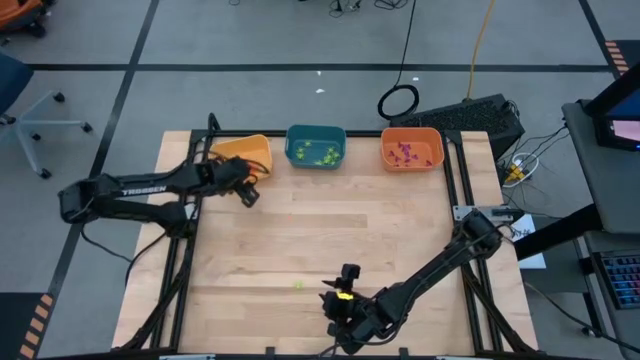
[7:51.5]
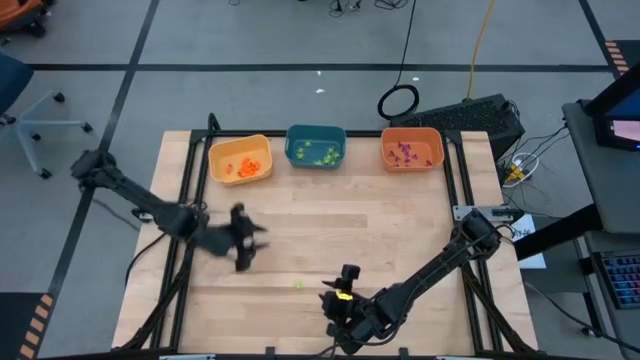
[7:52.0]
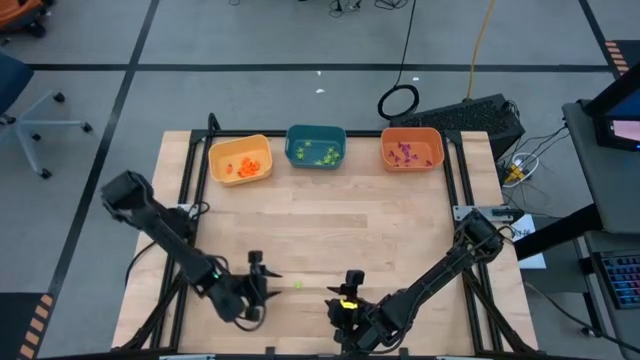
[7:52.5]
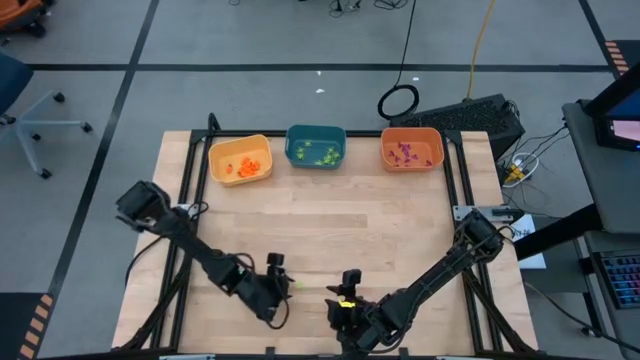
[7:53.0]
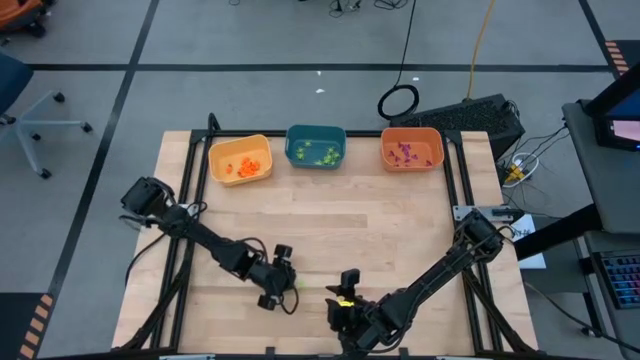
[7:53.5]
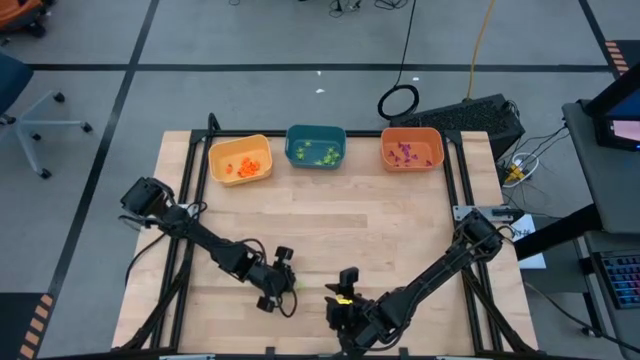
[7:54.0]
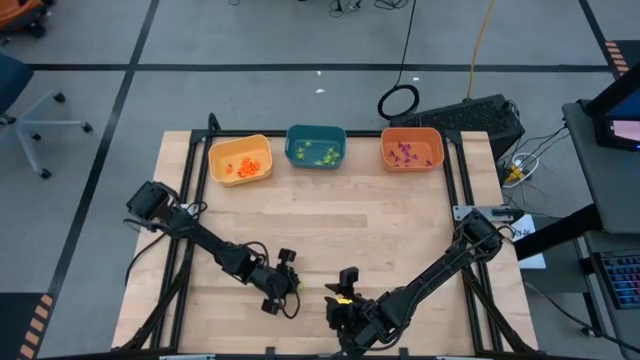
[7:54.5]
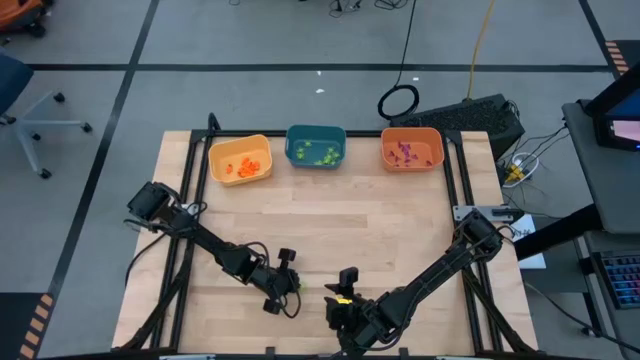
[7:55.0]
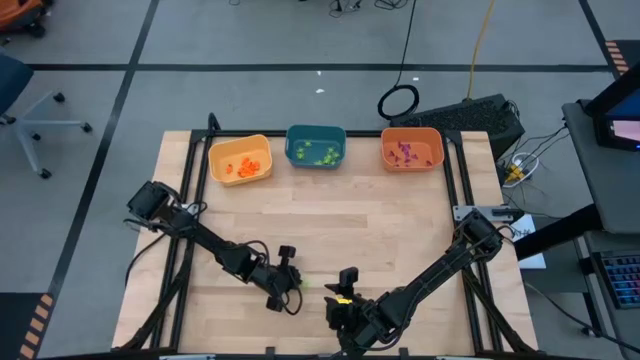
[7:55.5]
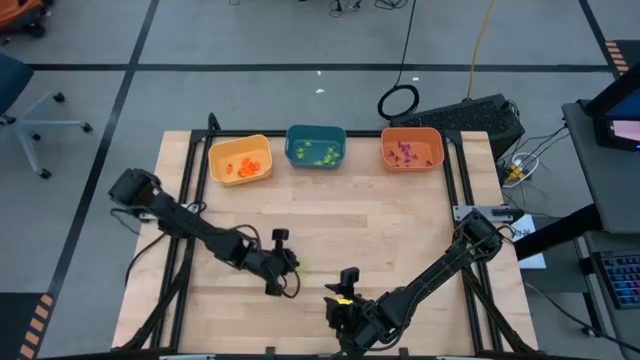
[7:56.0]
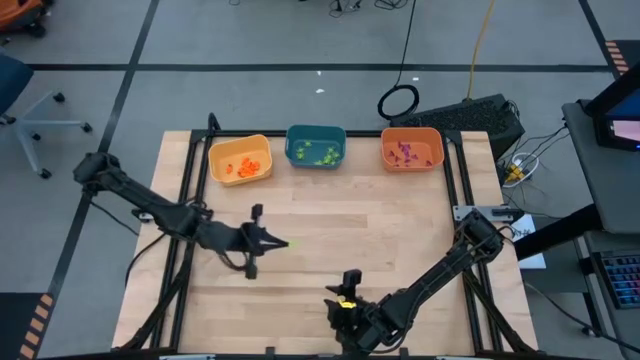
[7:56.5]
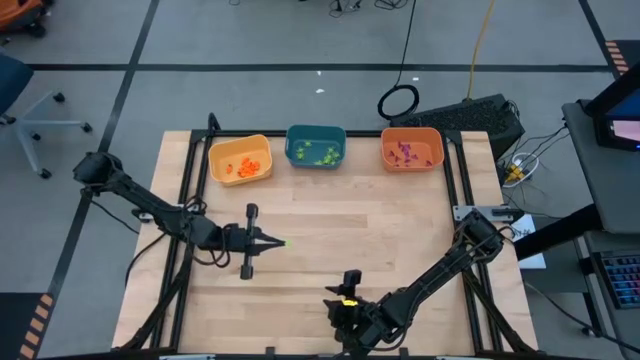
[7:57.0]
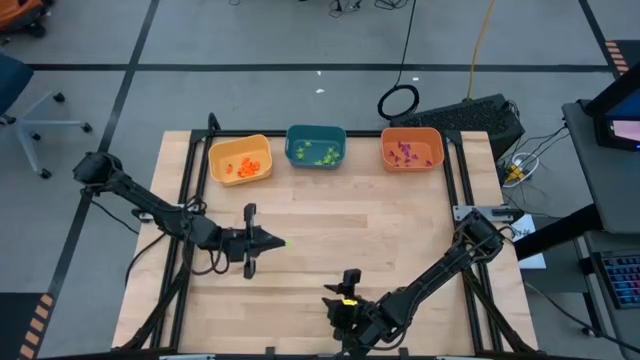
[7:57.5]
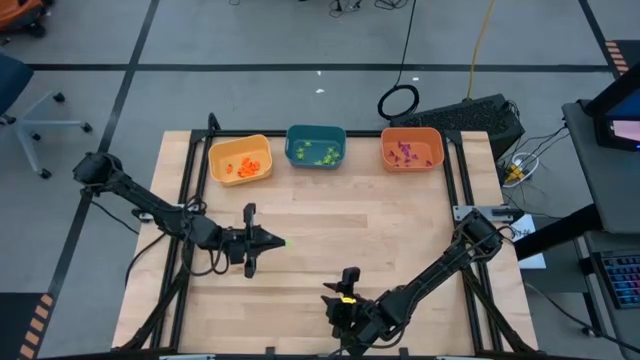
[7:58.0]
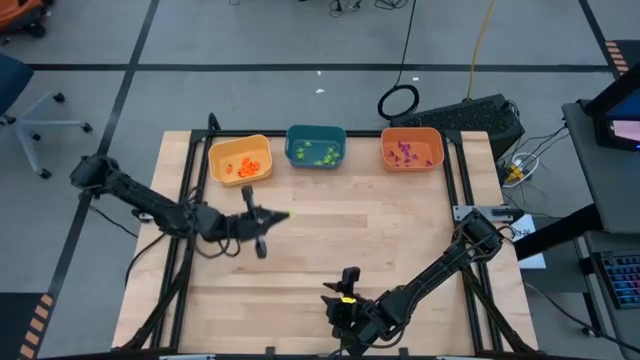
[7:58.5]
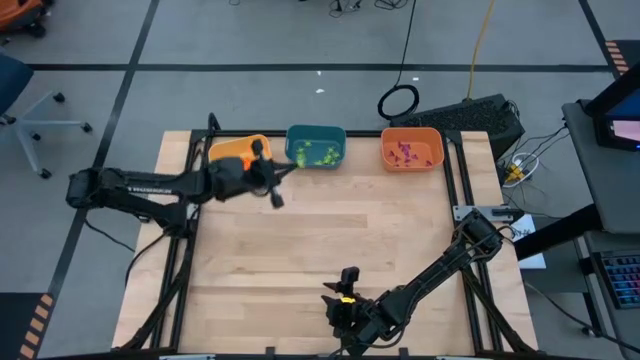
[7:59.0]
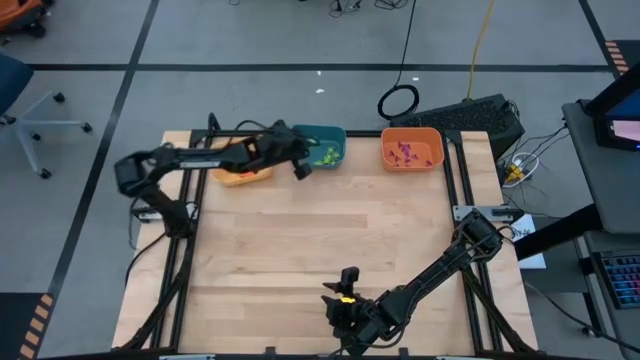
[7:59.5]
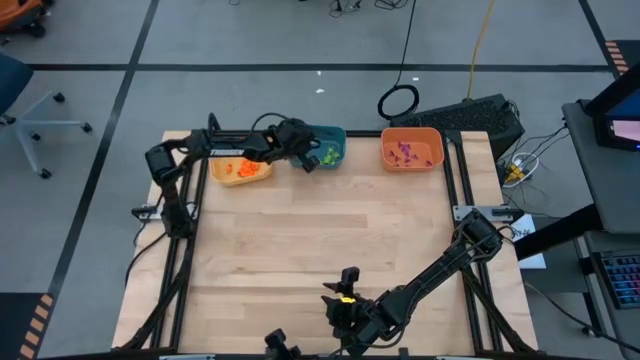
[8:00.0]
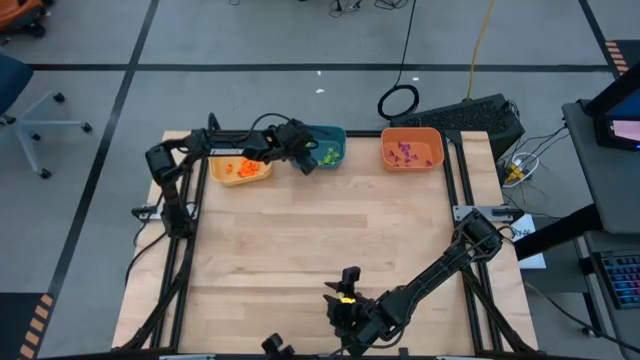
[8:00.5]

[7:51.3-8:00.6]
Task: Sort Halloween decoration
Put the green spider toy into the blue bin

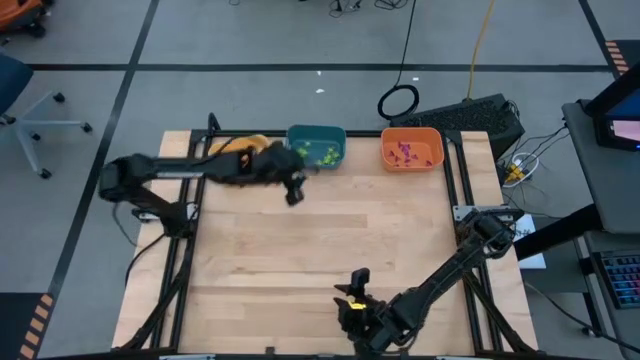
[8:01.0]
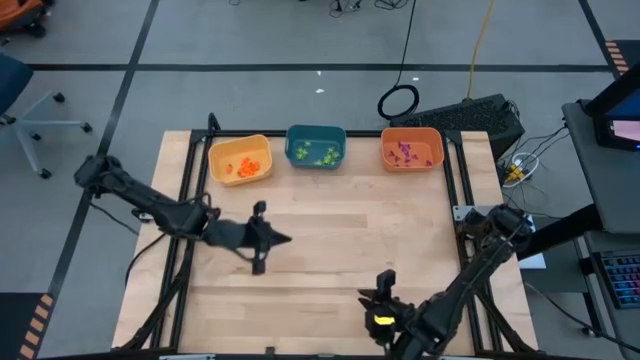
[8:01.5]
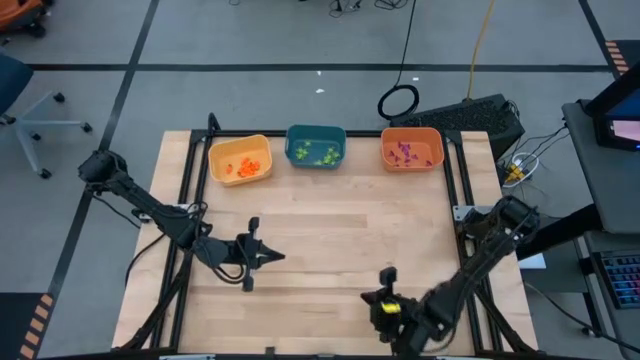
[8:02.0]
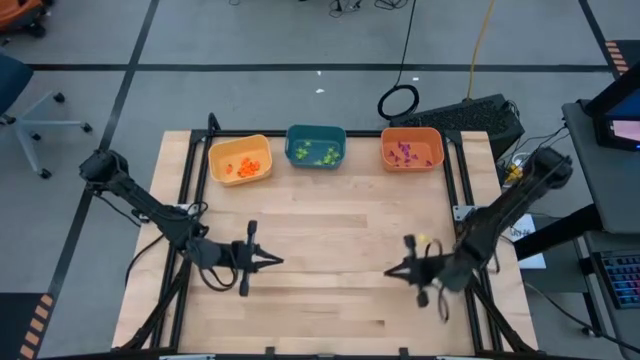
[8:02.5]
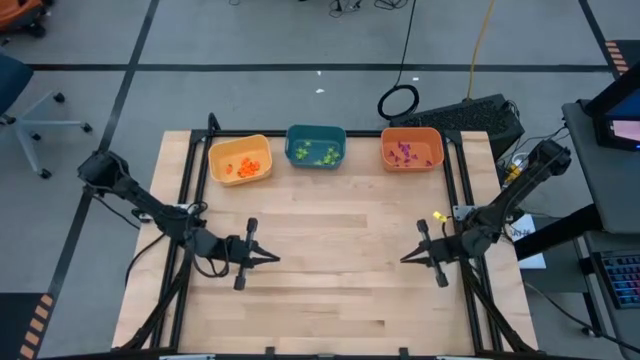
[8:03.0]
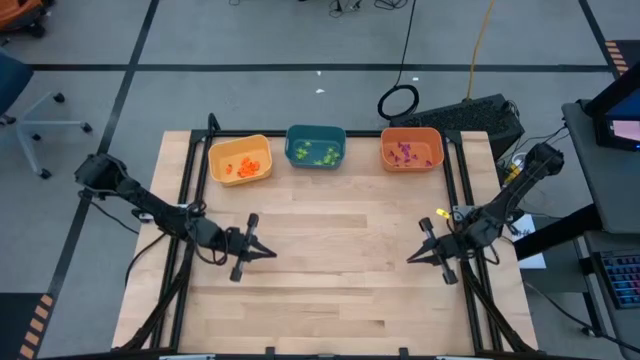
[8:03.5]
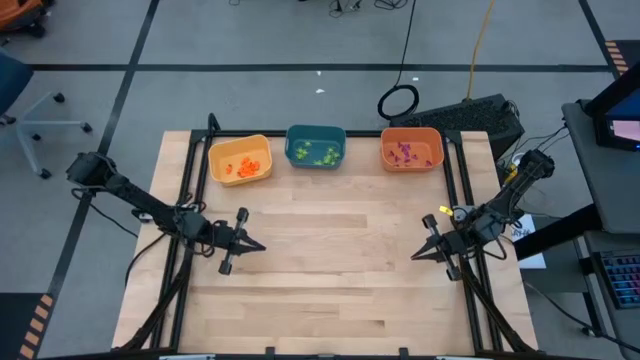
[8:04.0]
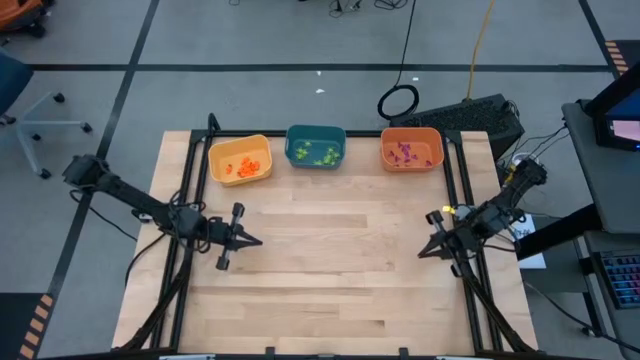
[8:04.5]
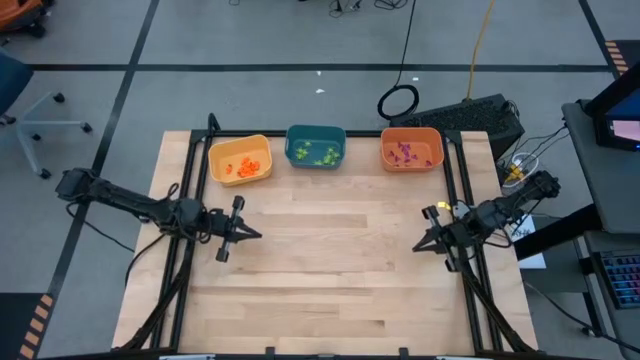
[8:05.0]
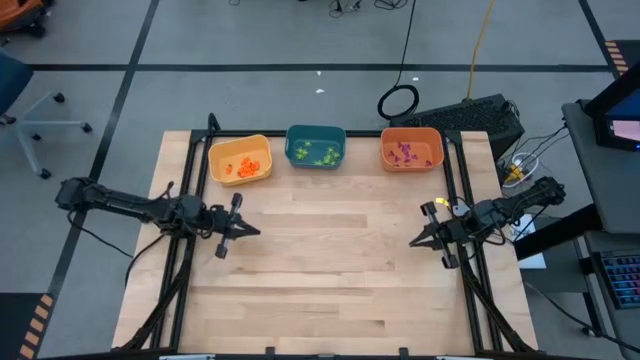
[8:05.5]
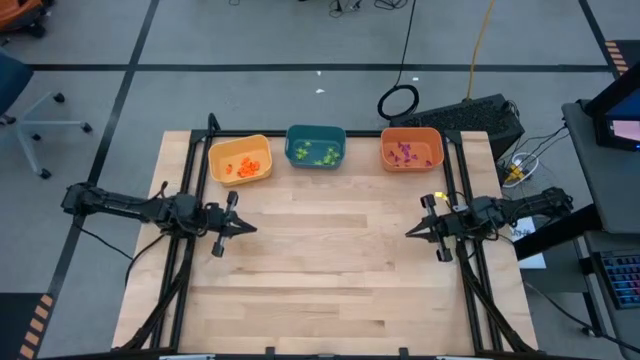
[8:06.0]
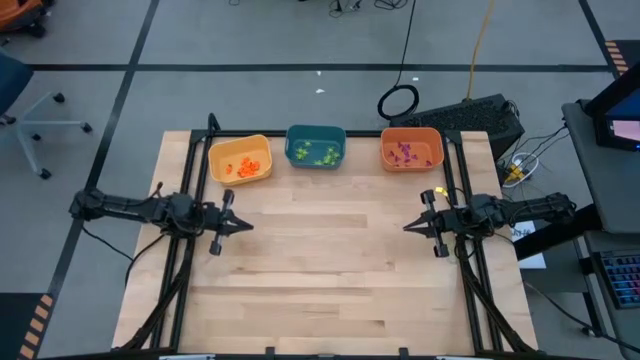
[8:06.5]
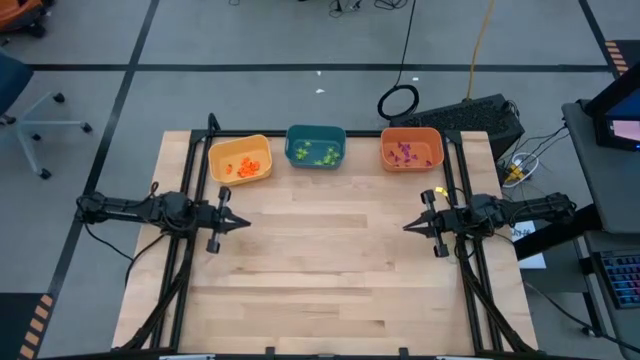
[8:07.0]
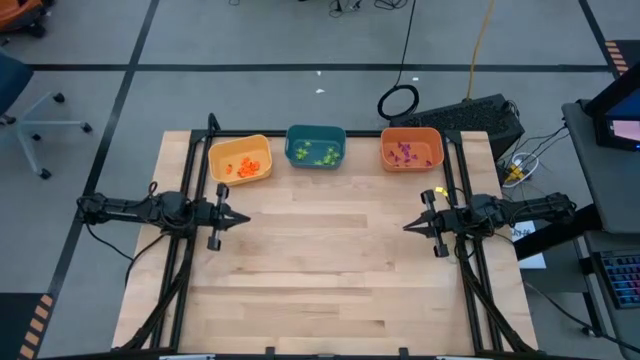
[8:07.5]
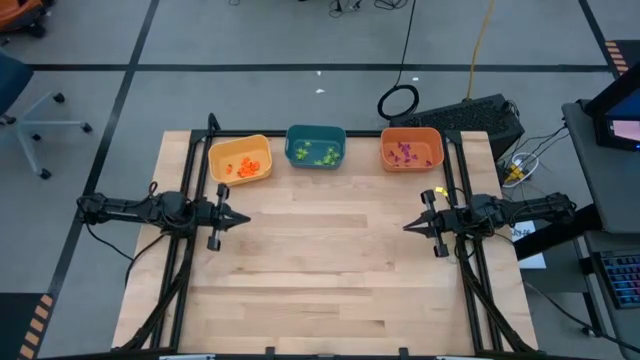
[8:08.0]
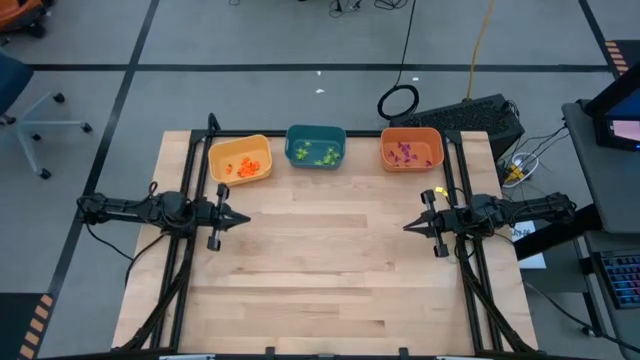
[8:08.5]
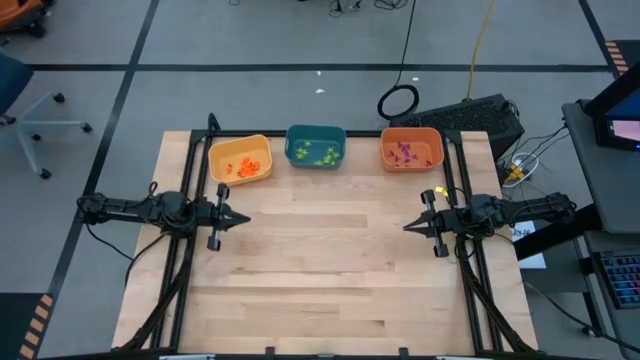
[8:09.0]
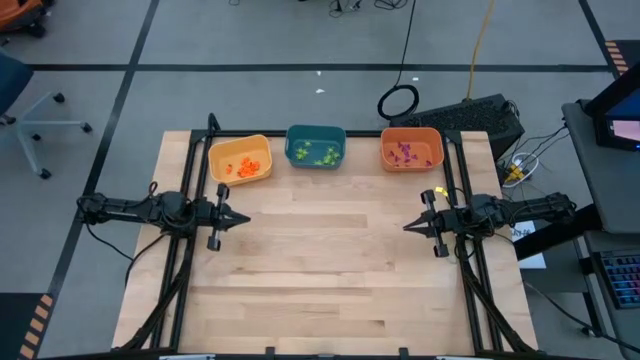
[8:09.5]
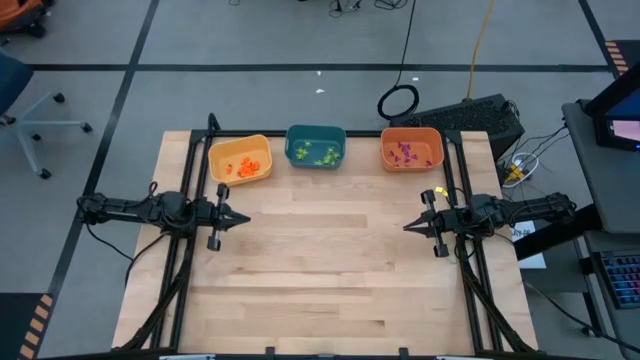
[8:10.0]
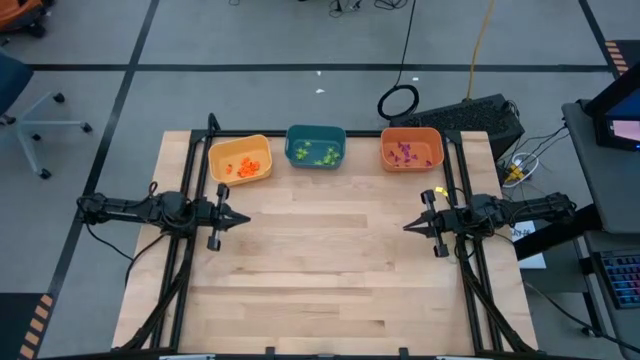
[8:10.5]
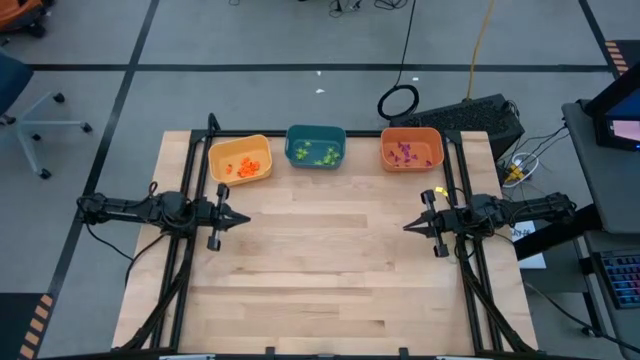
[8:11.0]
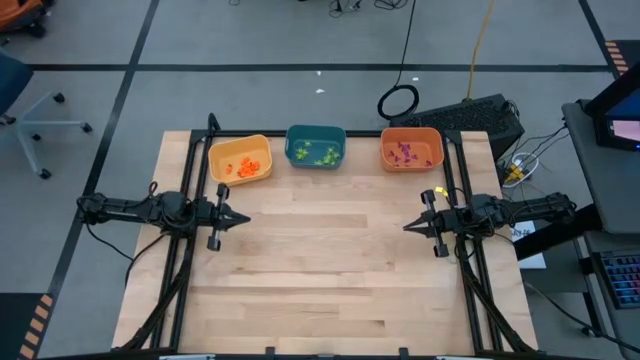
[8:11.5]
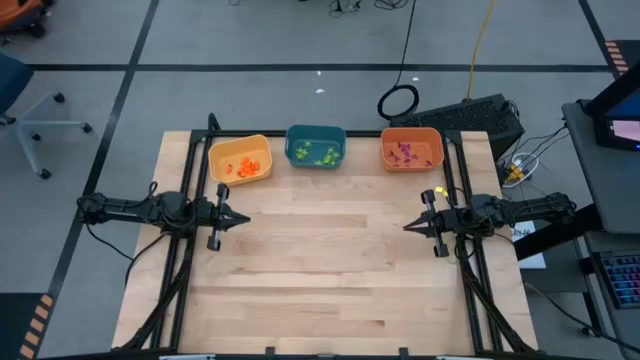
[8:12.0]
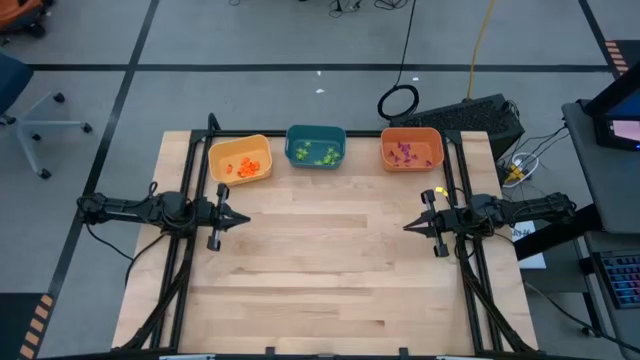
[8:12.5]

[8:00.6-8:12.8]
Return to Home Position
